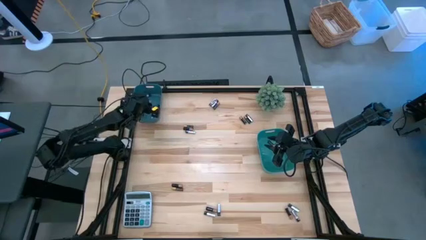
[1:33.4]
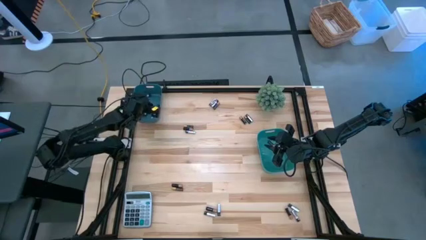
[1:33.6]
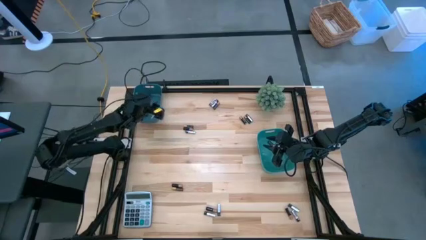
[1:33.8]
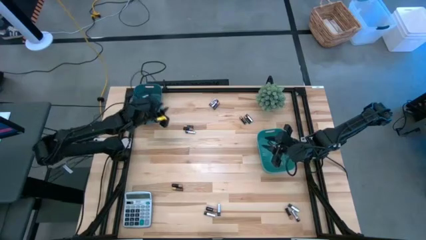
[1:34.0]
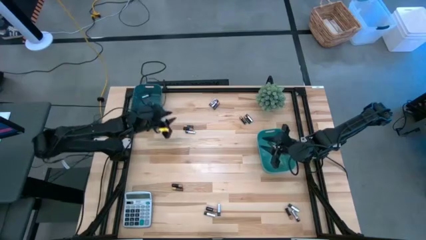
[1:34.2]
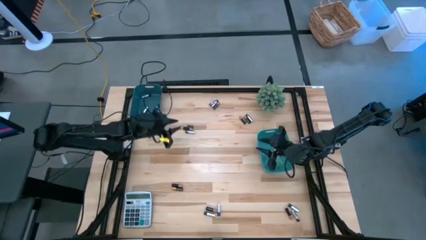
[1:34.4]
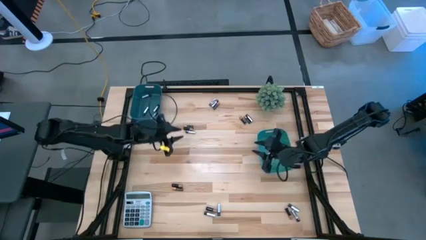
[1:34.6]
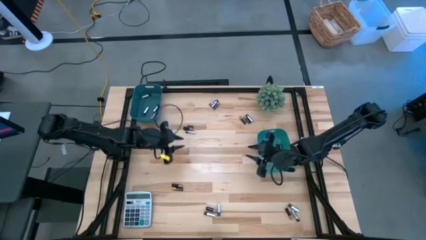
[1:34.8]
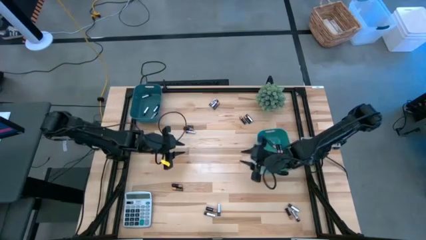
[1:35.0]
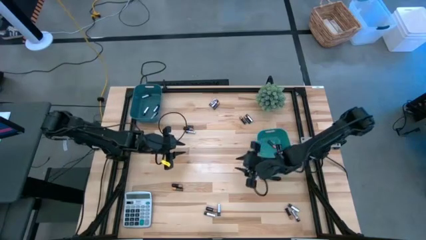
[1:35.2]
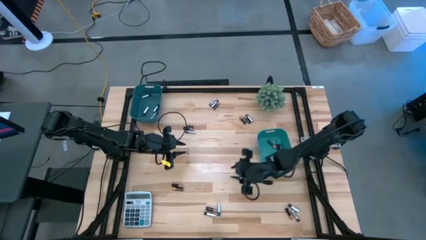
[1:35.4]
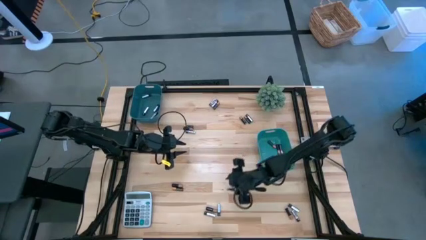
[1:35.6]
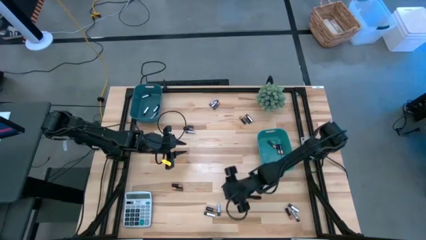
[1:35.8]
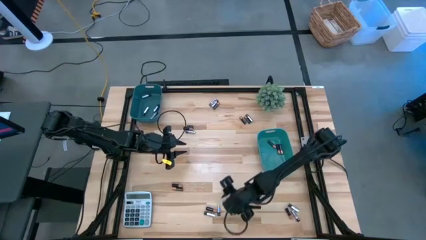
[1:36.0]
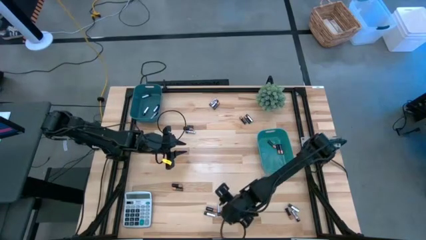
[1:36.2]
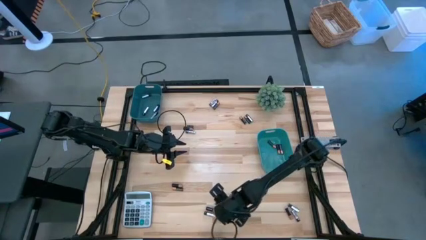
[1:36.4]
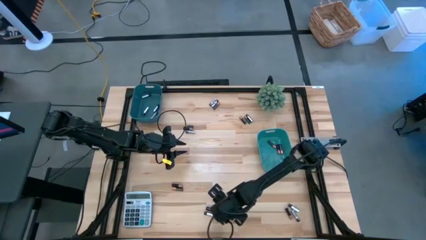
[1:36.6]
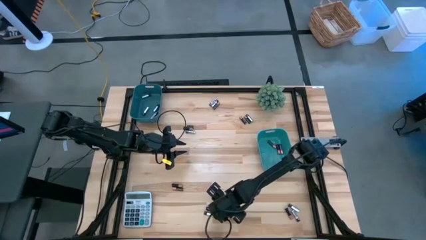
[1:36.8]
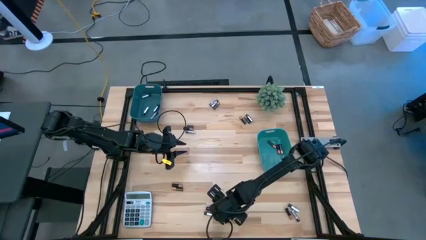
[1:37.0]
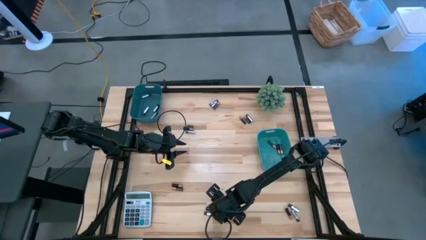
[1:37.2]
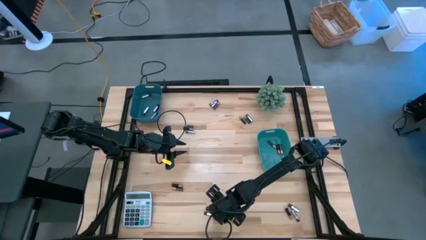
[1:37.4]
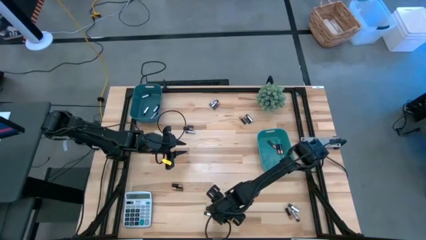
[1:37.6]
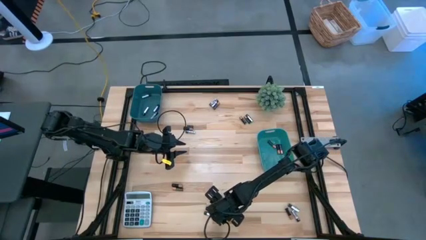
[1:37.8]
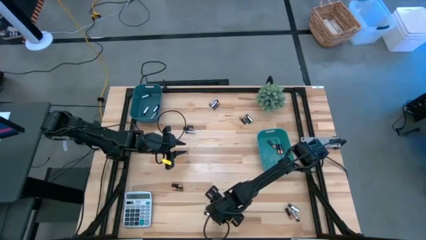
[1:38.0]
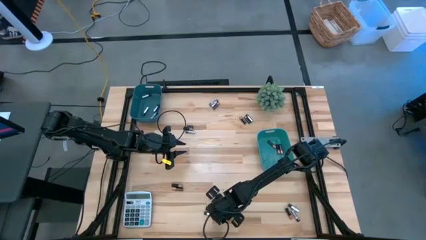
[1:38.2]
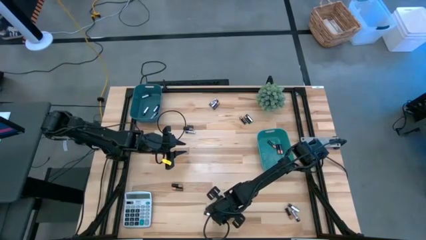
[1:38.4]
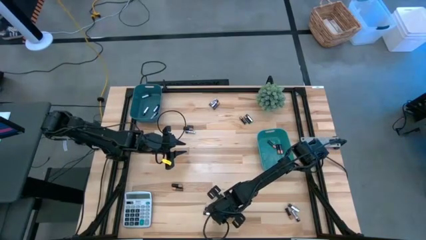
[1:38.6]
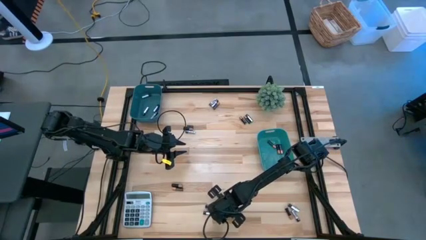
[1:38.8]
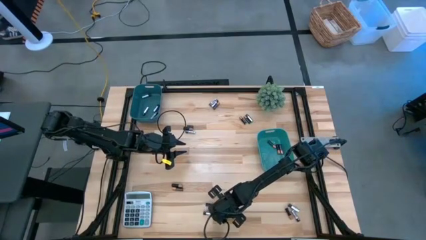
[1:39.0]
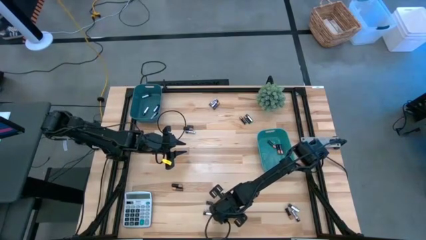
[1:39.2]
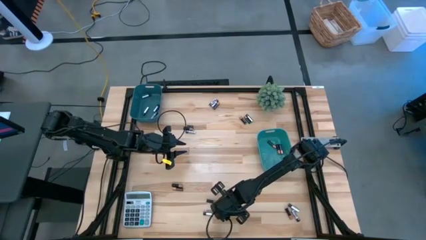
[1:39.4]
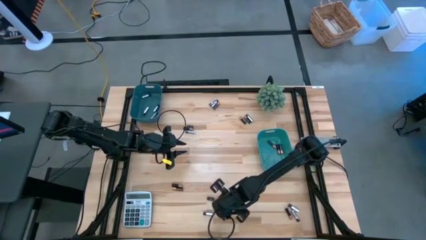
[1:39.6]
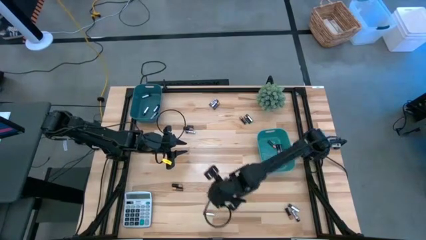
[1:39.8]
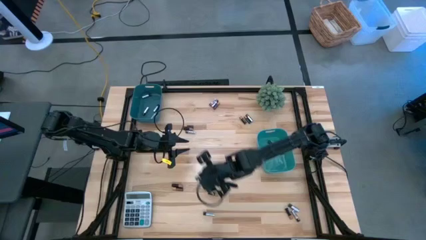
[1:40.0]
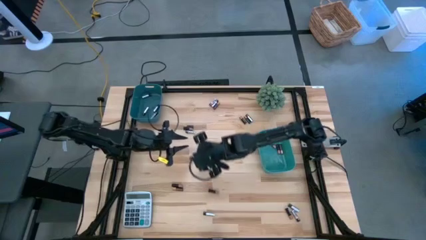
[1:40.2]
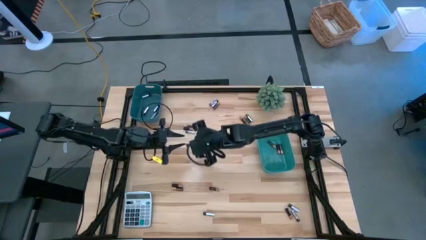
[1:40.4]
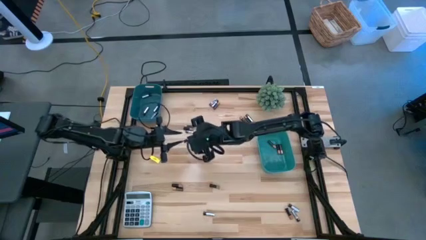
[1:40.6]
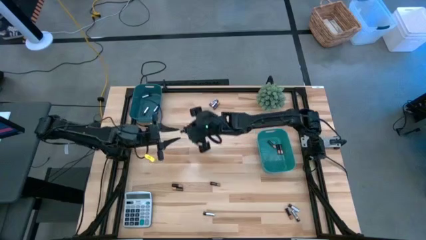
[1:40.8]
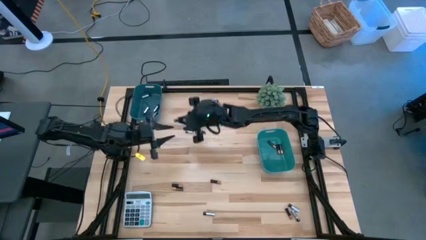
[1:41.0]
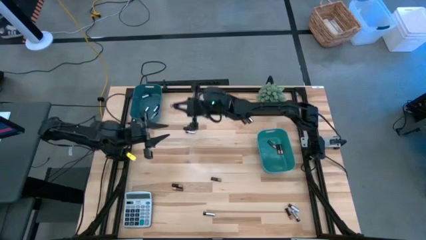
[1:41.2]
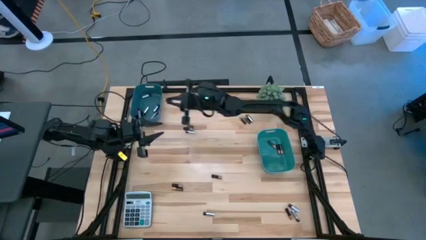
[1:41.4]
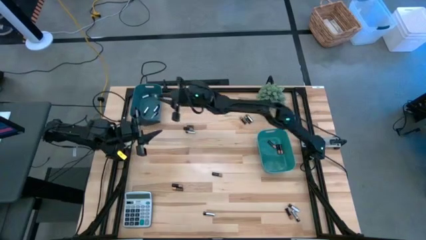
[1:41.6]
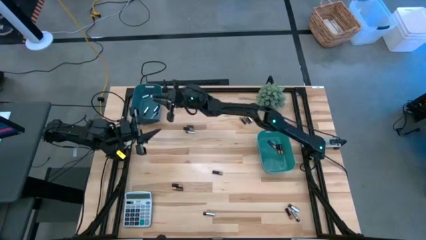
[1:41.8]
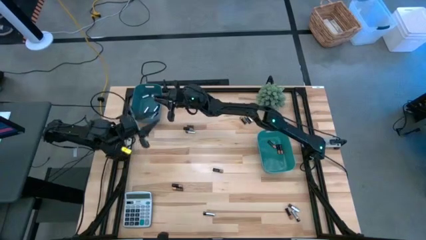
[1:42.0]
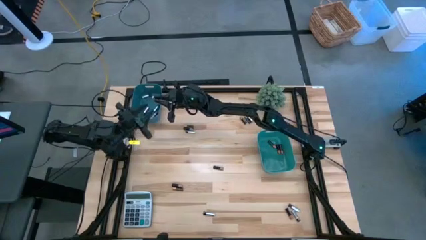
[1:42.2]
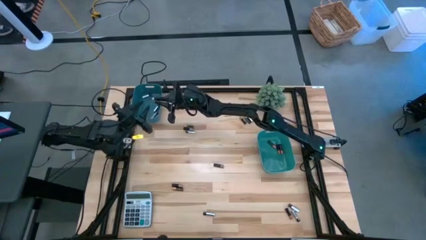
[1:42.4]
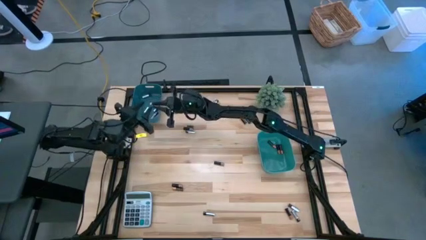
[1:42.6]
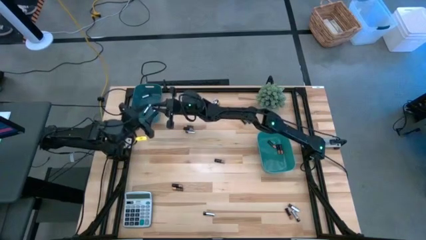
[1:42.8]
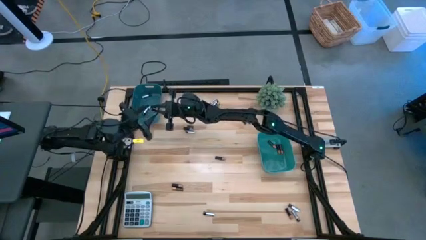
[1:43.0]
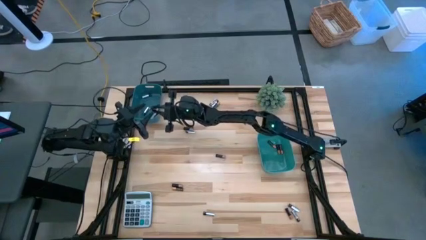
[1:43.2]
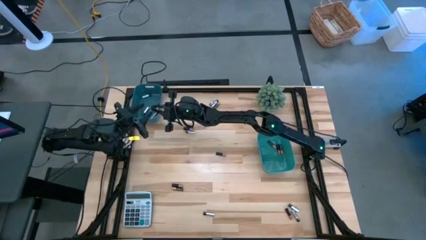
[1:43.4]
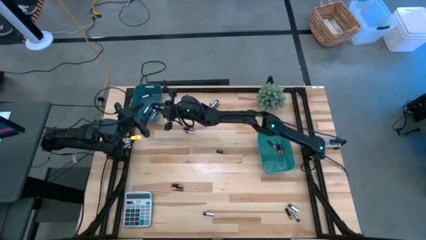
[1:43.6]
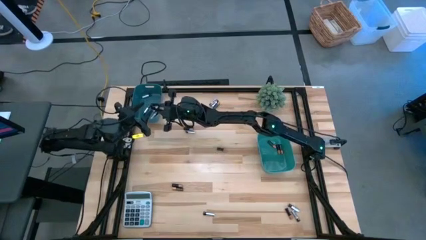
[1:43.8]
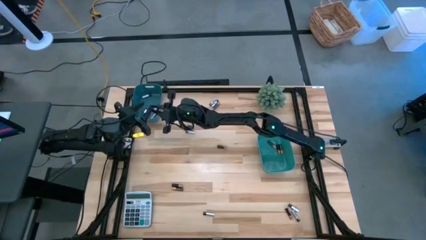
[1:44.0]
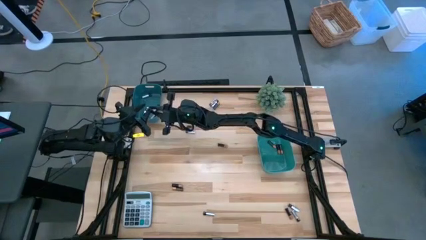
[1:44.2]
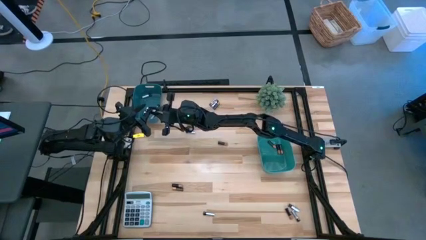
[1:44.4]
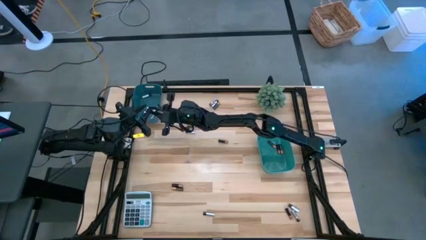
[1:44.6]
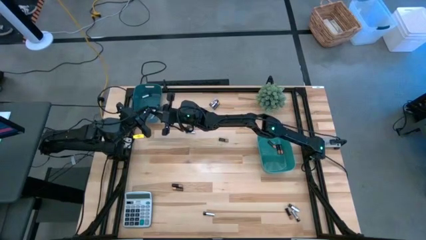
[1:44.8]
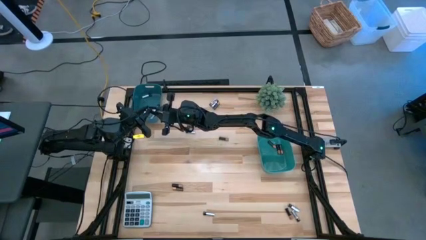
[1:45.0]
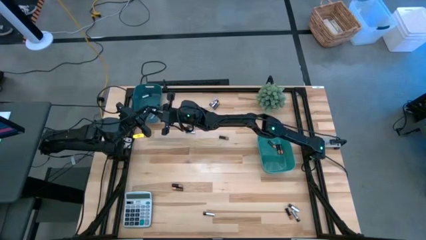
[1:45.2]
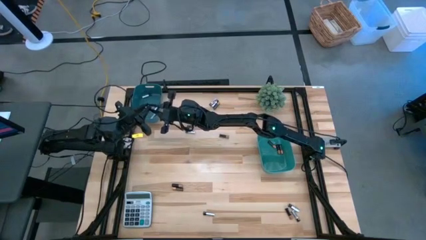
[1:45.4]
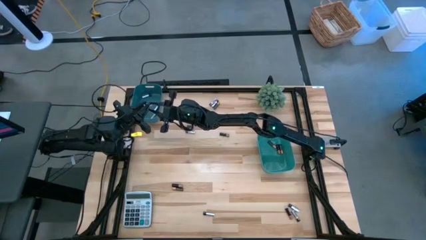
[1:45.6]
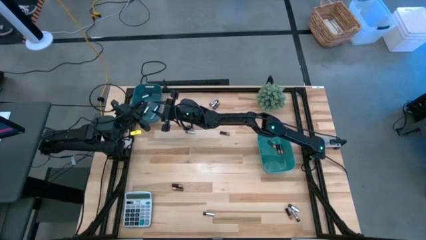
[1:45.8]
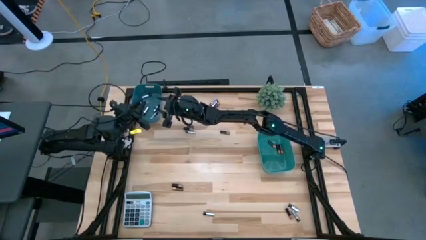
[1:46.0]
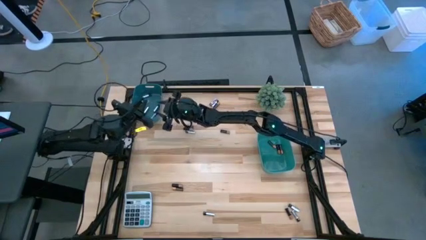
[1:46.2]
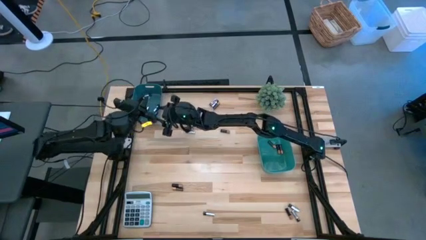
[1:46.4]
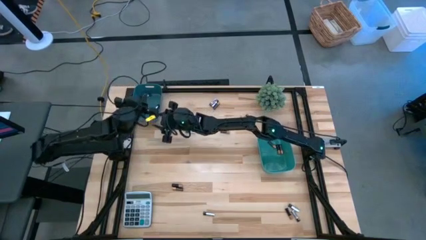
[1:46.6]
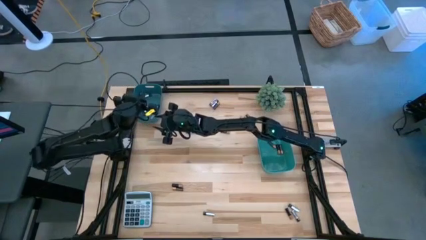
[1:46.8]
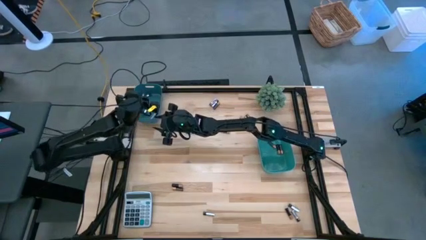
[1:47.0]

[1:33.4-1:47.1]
Task: Sort batteries
Put the silver battery into the blue bin
